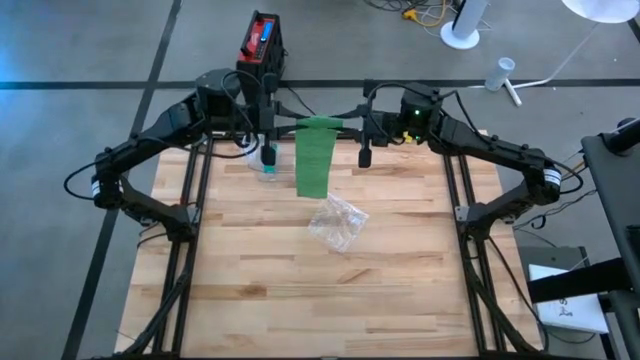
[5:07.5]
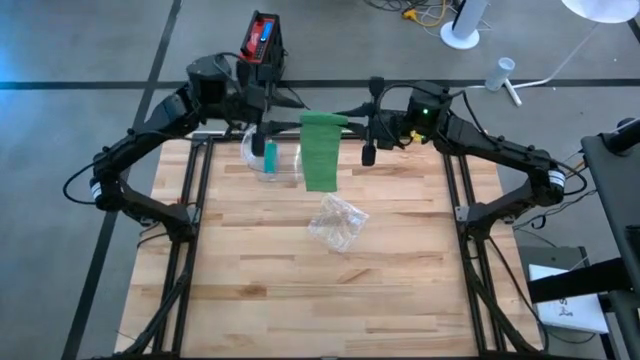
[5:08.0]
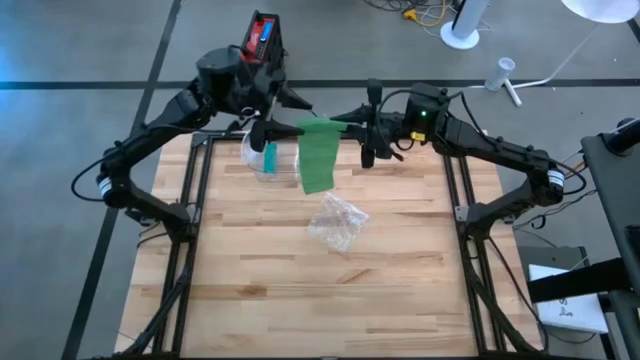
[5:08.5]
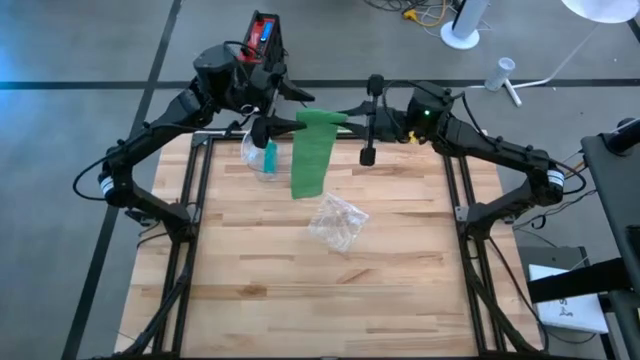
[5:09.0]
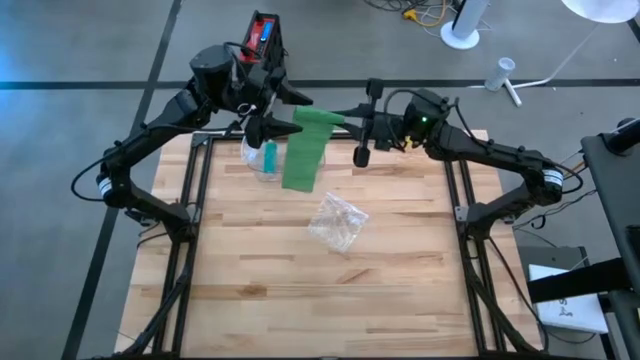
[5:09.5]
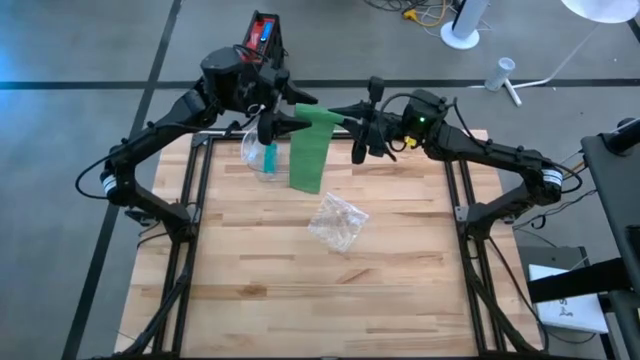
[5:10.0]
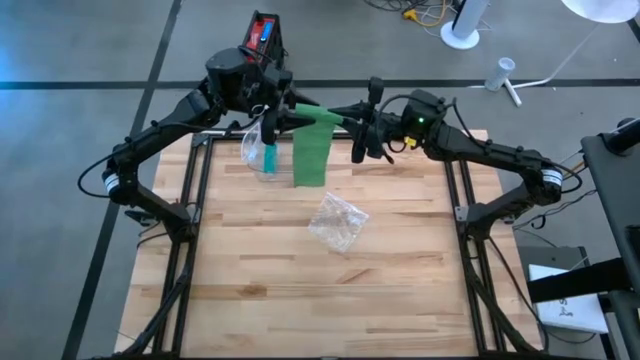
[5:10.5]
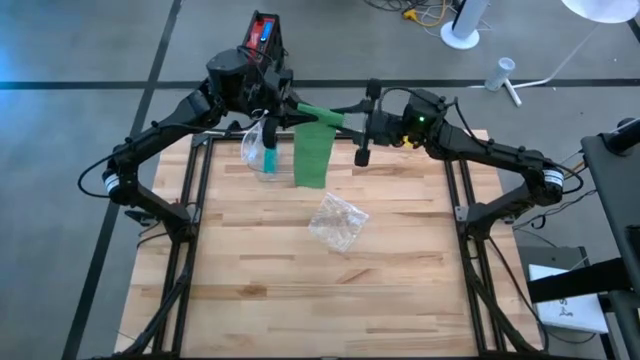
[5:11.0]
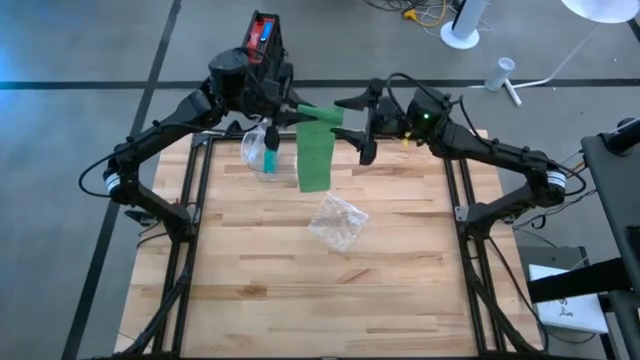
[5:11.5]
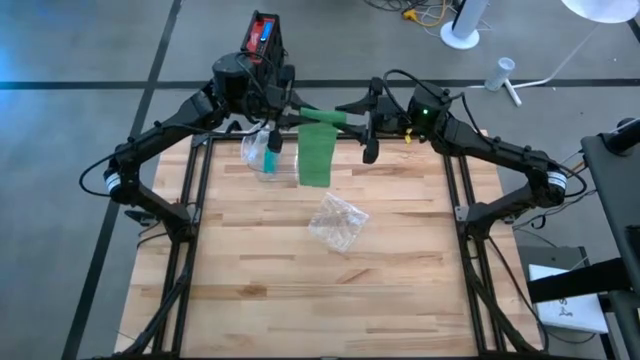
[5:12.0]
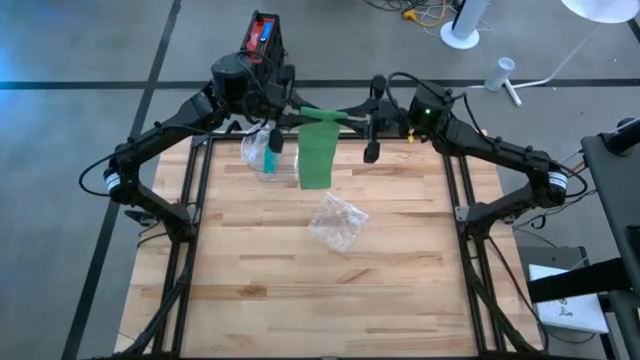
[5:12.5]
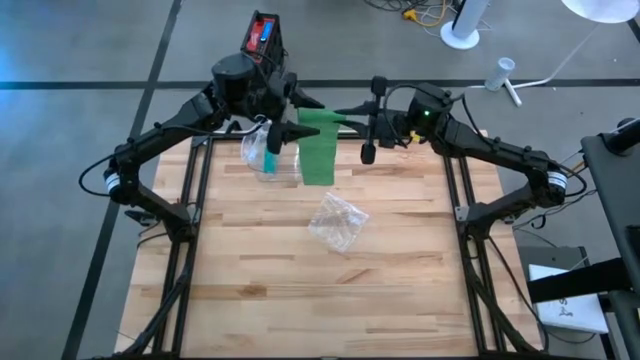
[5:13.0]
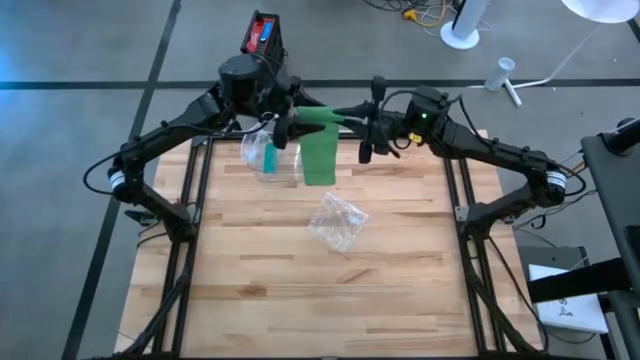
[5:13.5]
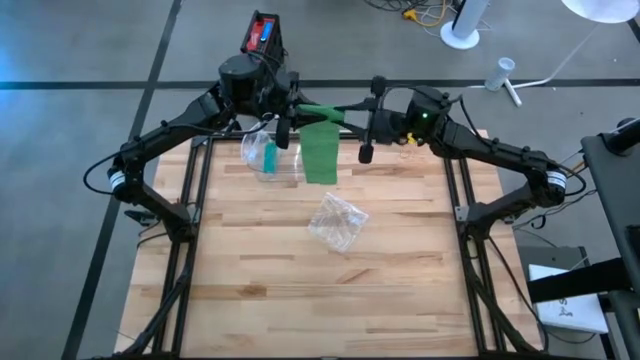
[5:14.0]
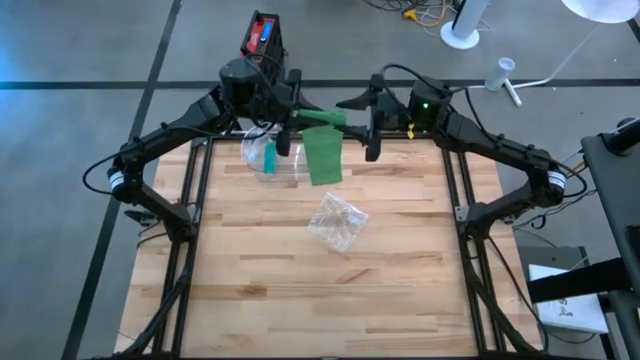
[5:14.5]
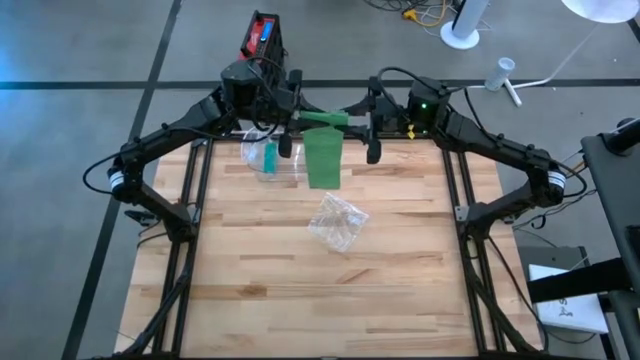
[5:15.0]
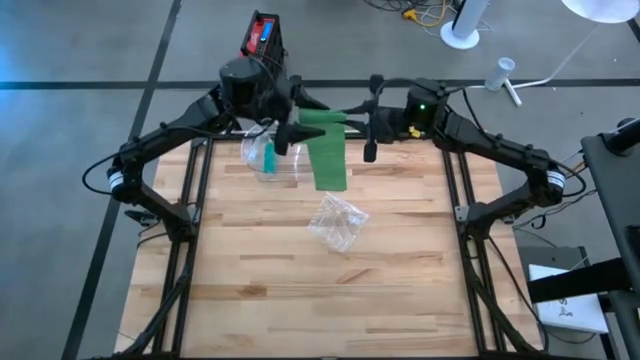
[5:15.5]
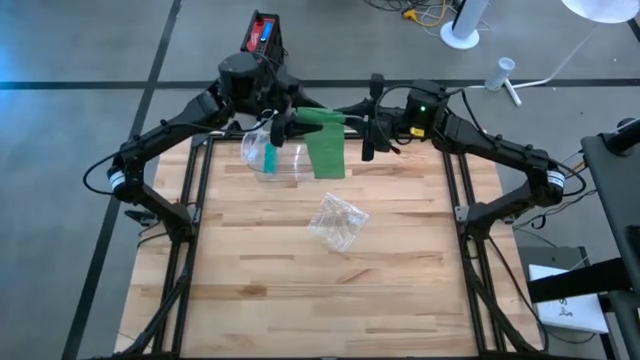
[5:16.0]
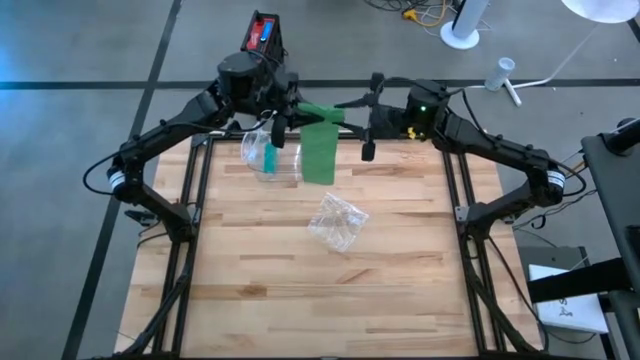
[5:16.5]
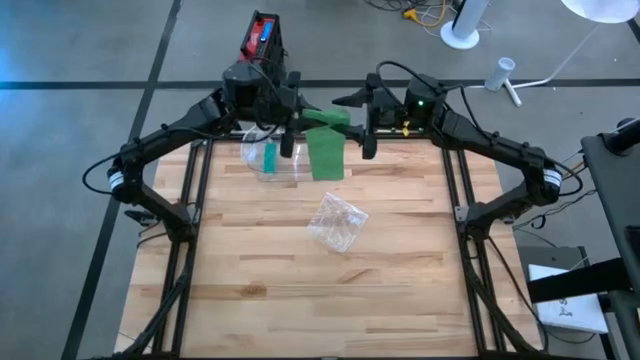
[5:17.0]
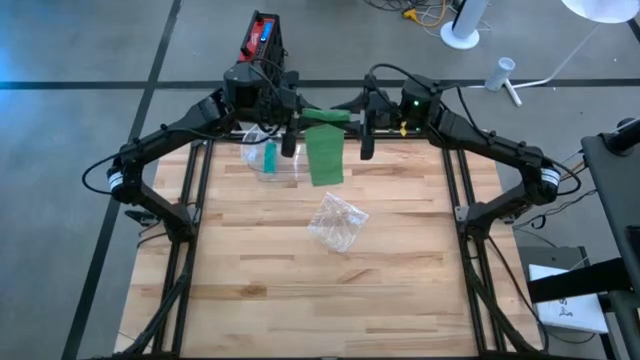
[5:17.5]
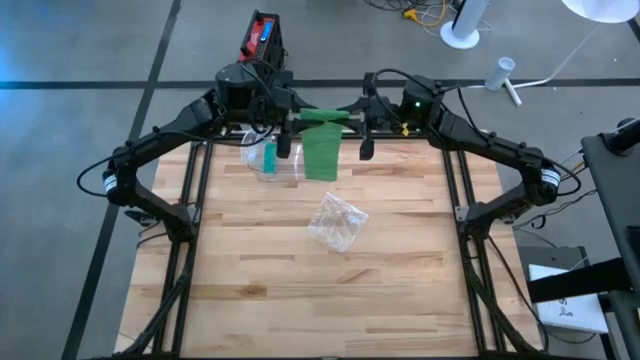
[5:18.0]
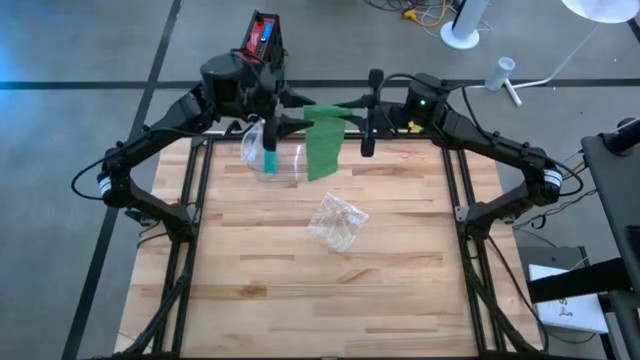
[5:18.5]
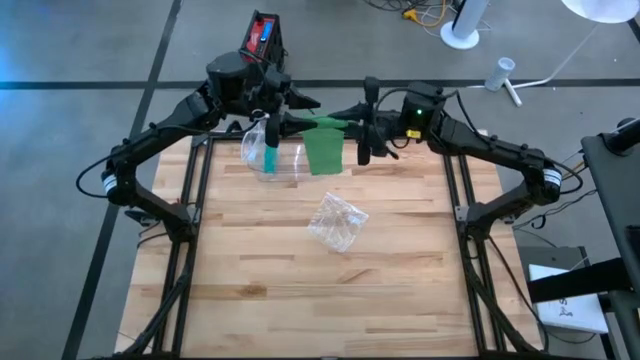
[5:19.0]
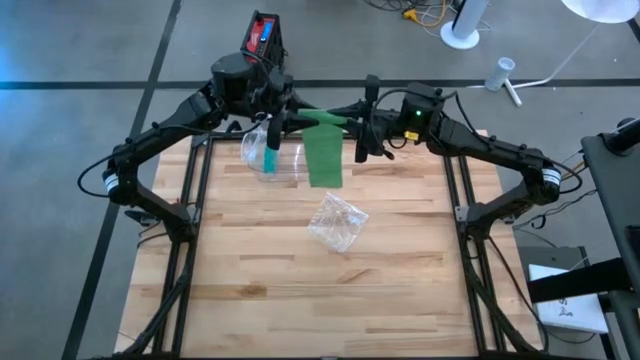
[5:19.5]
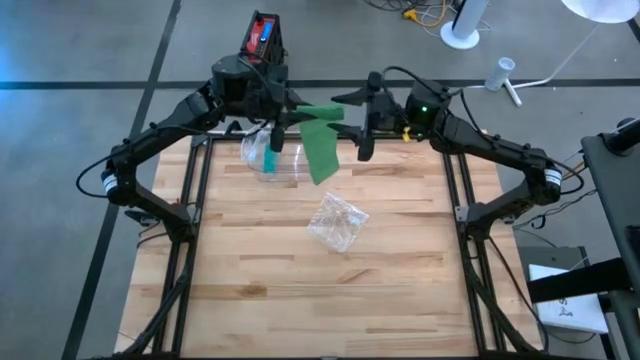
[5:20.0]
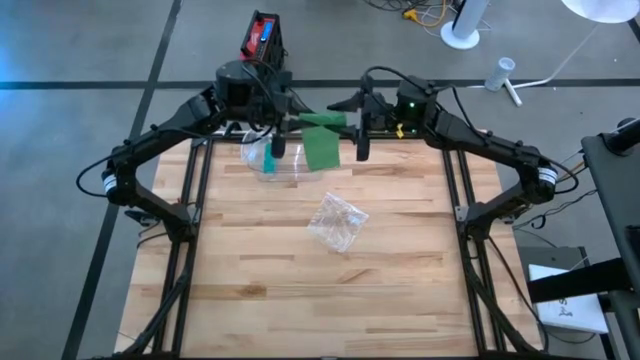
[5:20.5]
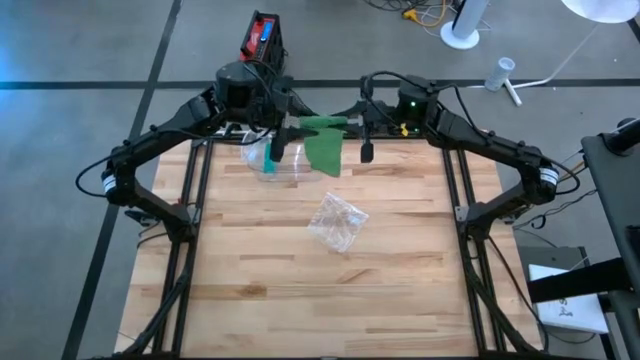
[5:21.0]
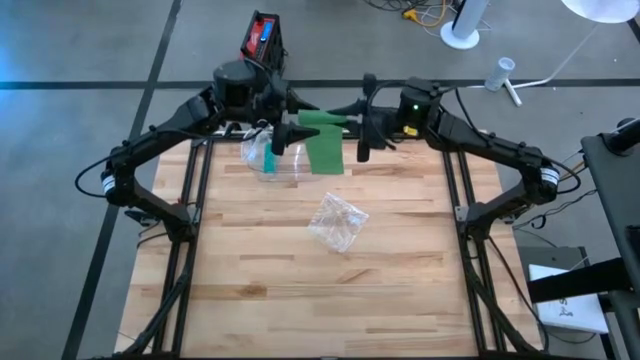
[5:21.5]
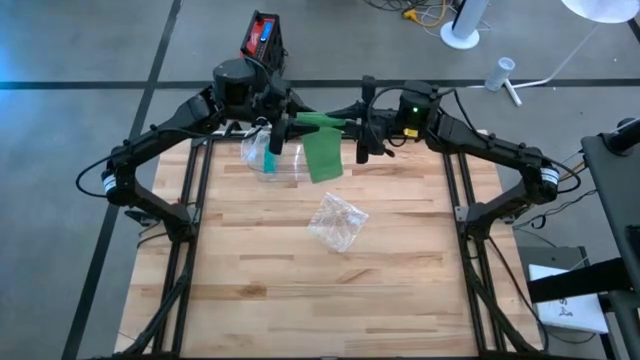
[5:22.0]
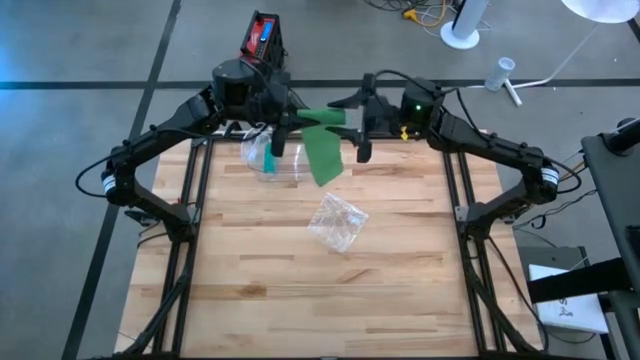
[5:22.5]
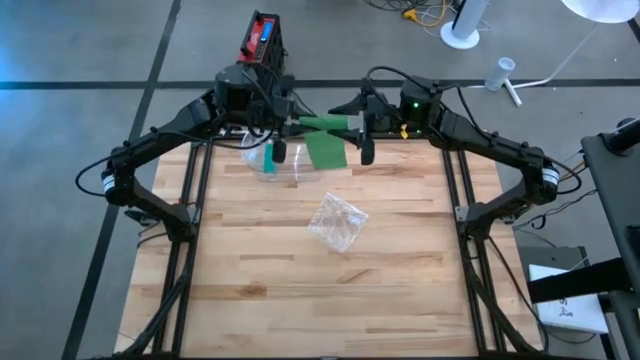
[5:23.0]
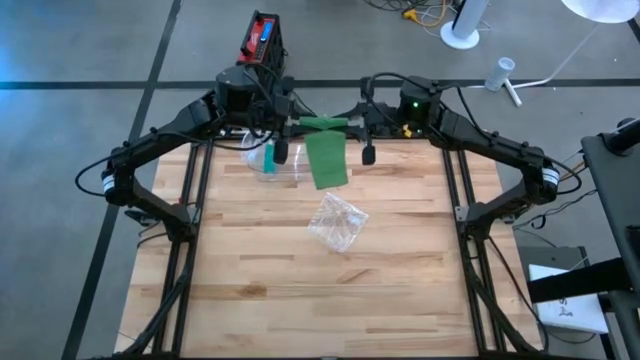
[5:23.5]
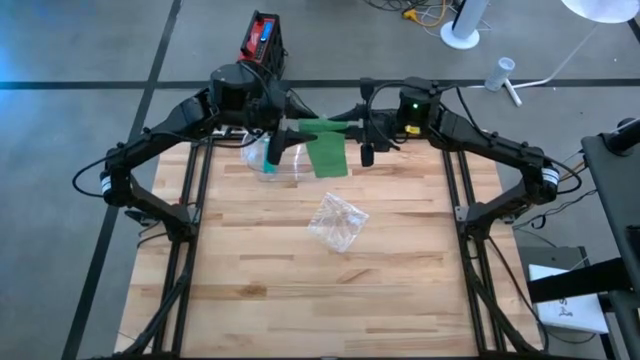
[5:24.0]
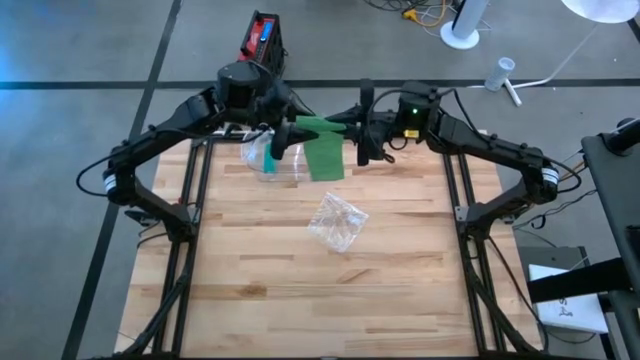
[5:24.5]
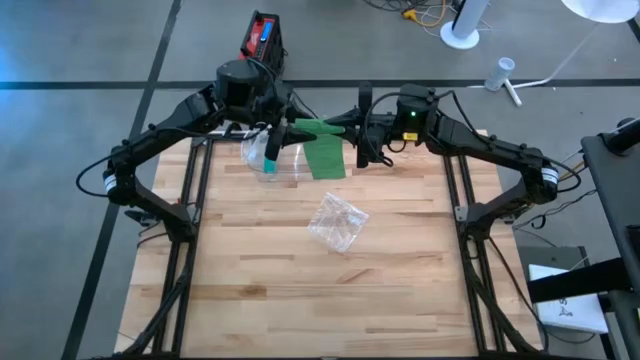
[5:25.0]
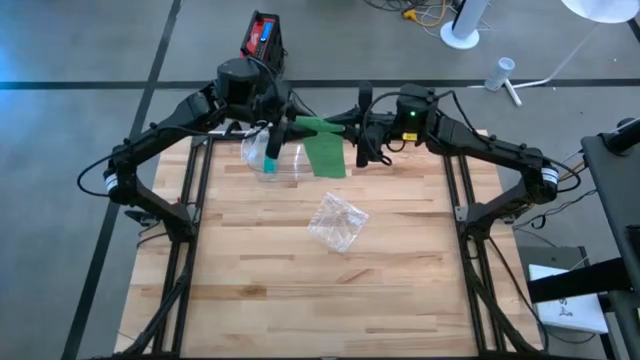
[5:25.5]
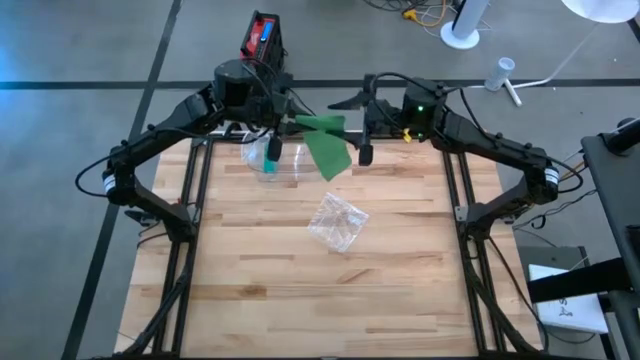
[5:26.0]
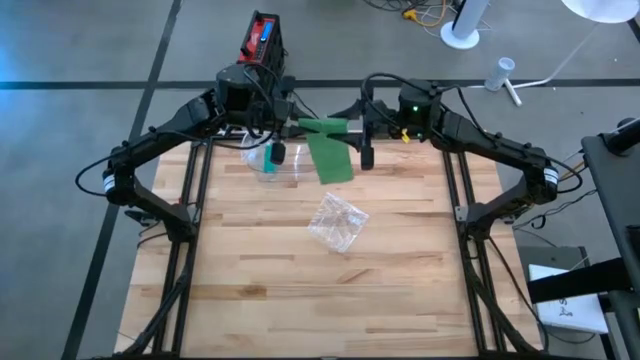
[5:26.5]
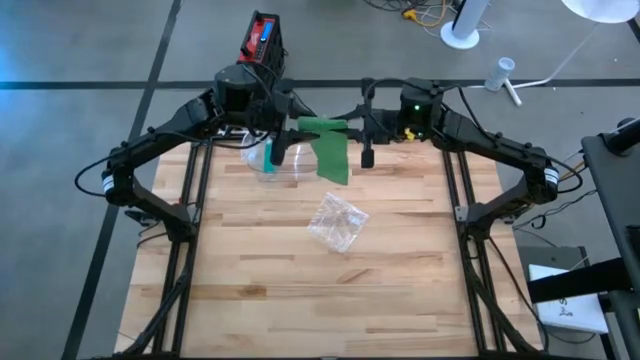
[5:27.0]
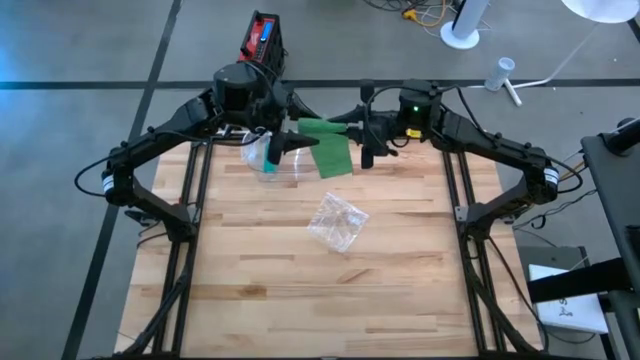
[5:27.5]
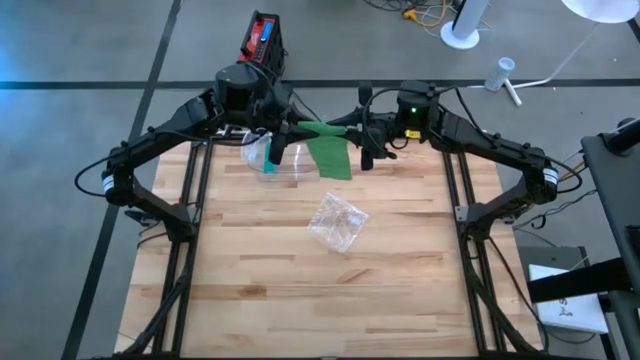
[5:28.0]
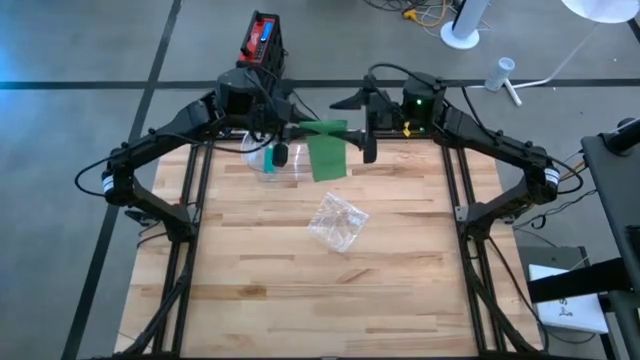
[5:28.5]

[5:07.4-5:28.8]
Task: Roll bandage
Roll the green bandage
